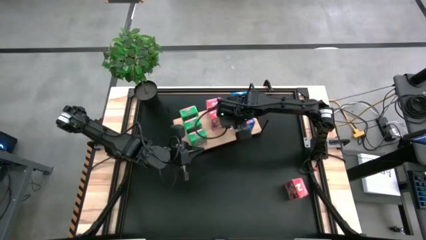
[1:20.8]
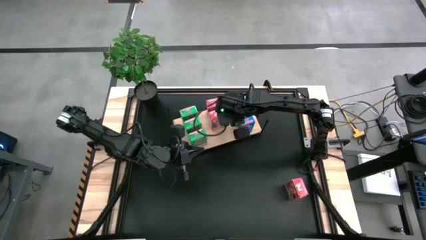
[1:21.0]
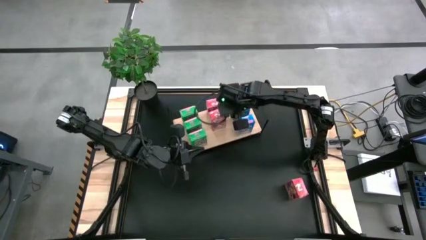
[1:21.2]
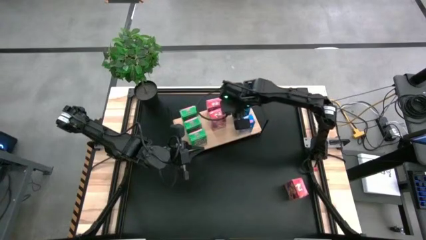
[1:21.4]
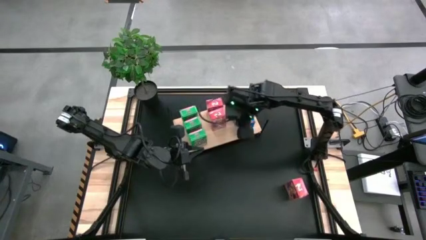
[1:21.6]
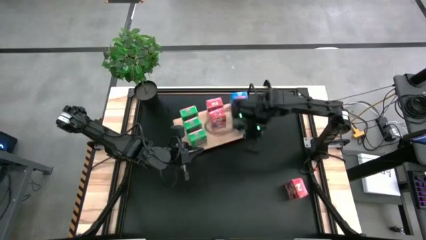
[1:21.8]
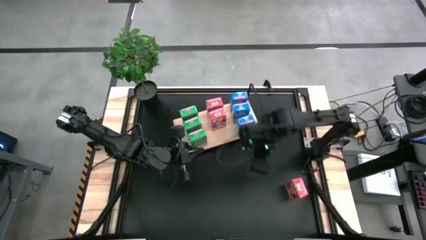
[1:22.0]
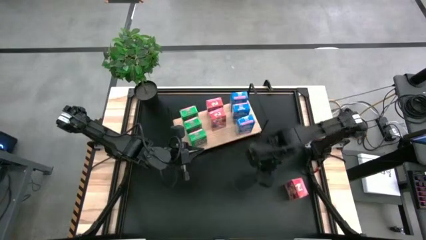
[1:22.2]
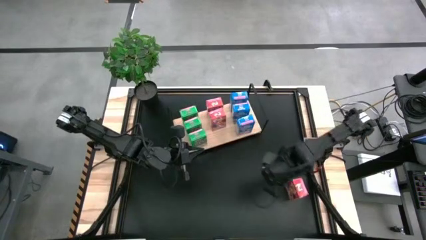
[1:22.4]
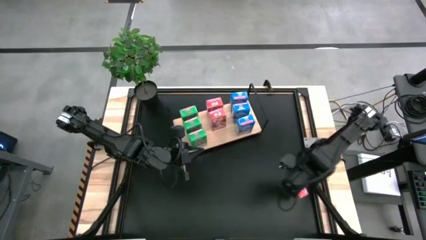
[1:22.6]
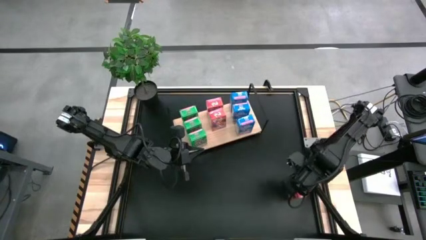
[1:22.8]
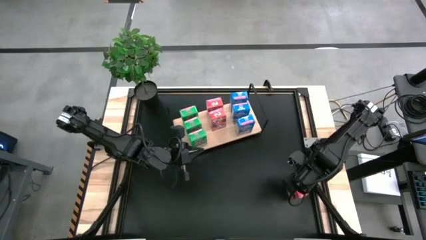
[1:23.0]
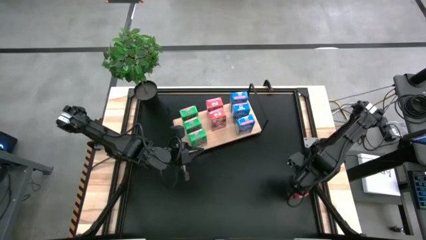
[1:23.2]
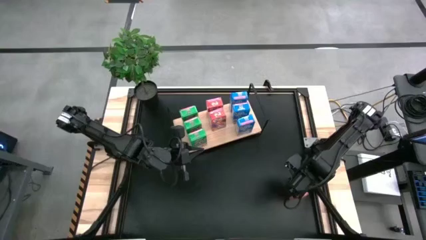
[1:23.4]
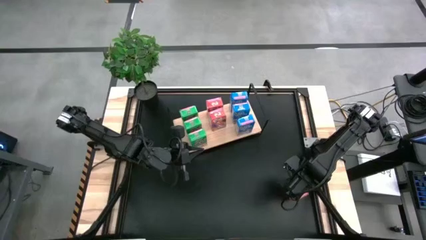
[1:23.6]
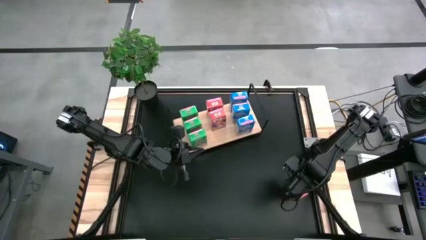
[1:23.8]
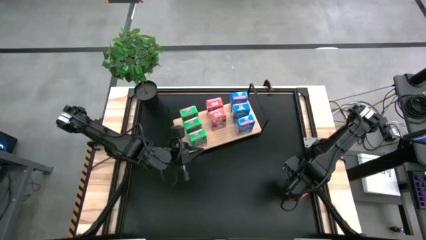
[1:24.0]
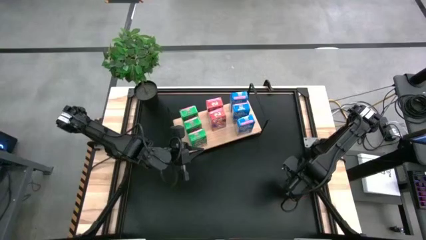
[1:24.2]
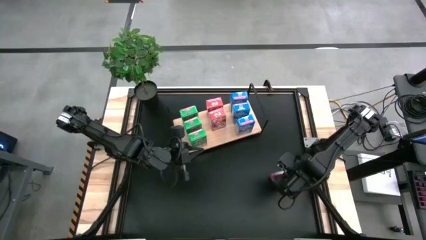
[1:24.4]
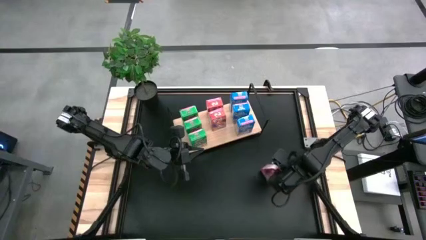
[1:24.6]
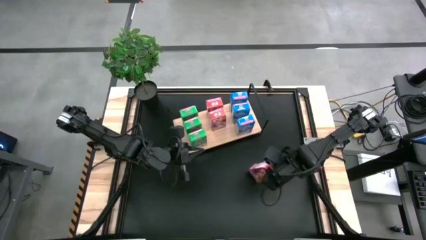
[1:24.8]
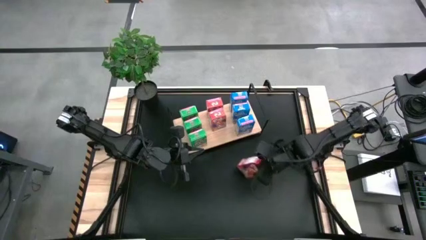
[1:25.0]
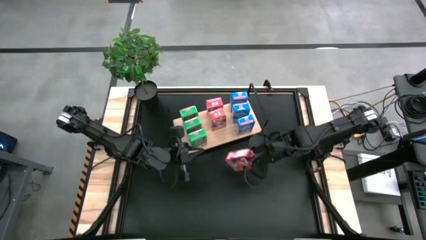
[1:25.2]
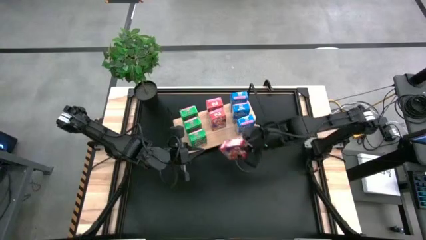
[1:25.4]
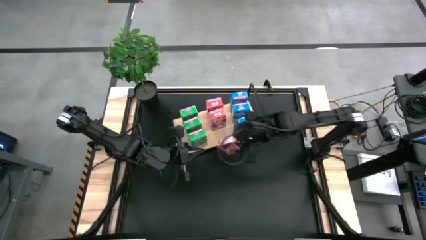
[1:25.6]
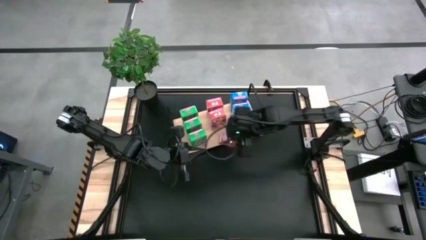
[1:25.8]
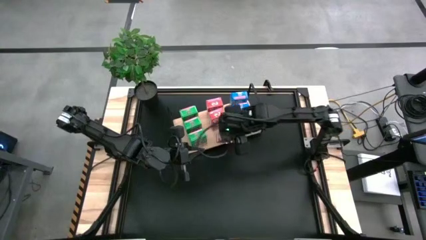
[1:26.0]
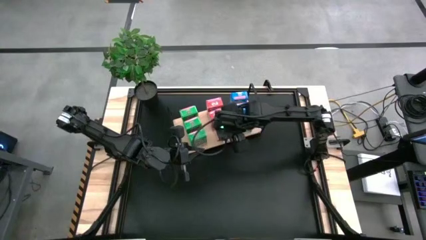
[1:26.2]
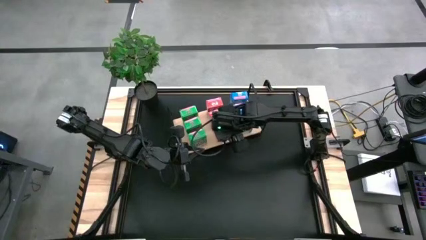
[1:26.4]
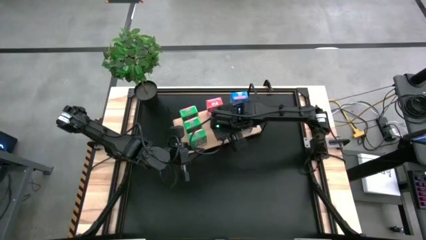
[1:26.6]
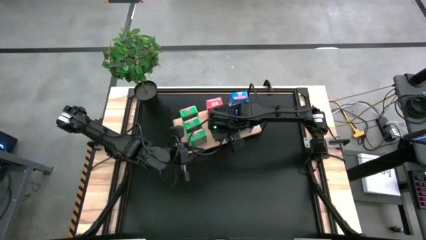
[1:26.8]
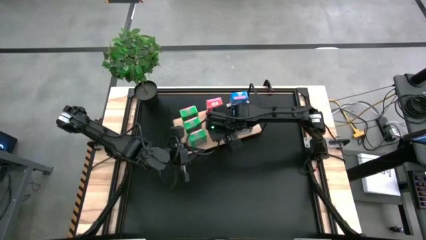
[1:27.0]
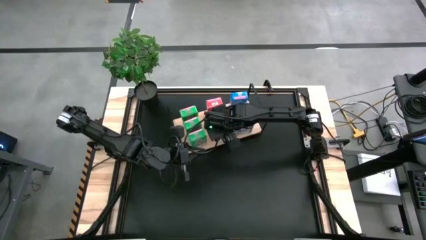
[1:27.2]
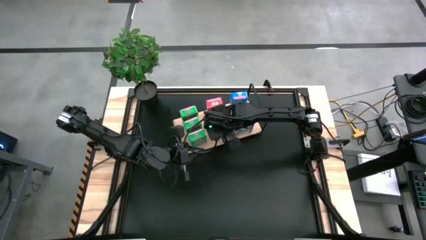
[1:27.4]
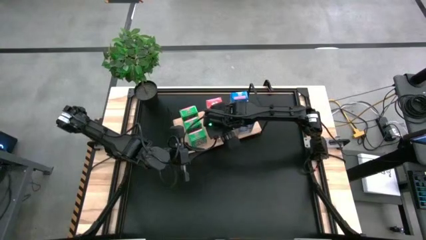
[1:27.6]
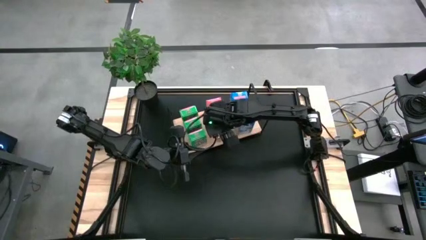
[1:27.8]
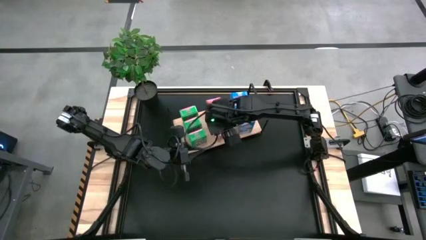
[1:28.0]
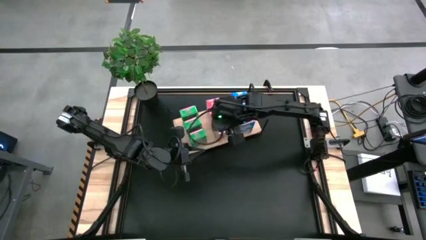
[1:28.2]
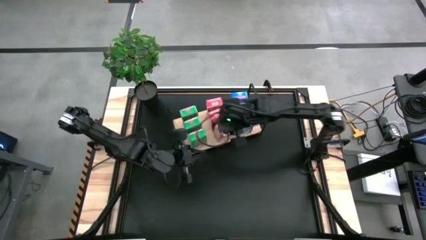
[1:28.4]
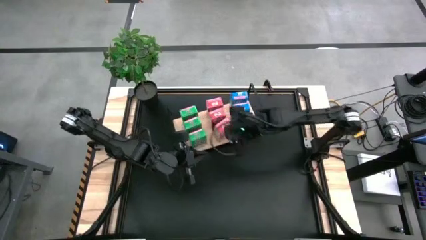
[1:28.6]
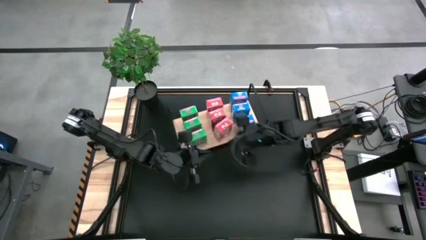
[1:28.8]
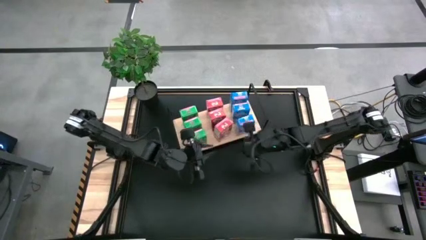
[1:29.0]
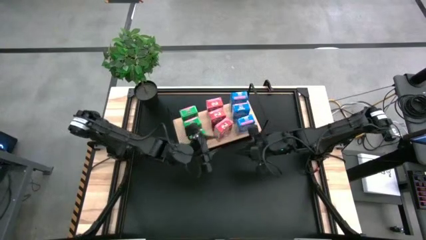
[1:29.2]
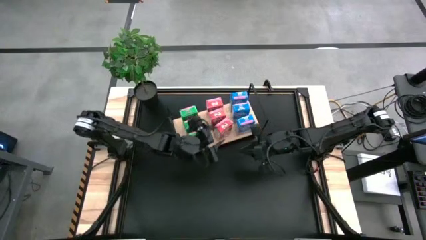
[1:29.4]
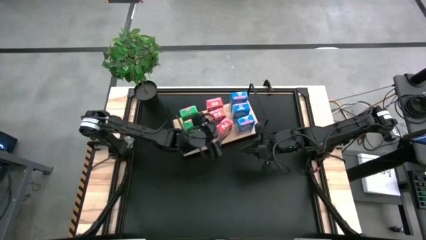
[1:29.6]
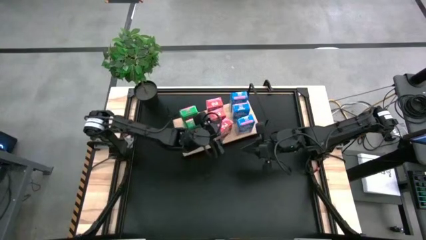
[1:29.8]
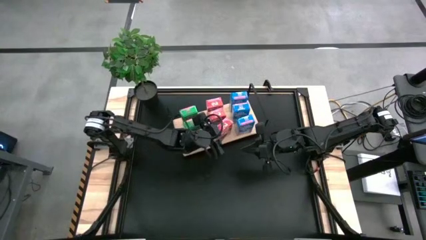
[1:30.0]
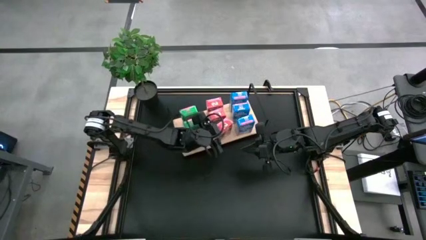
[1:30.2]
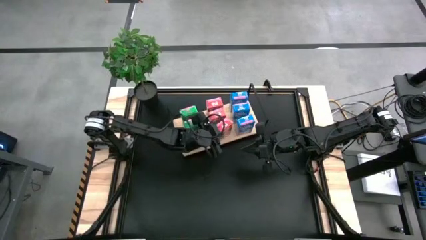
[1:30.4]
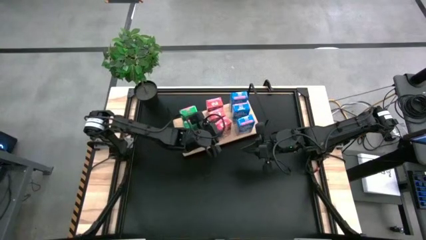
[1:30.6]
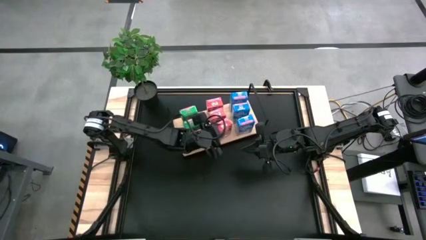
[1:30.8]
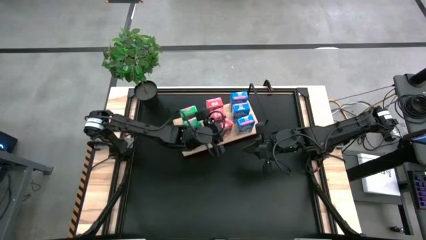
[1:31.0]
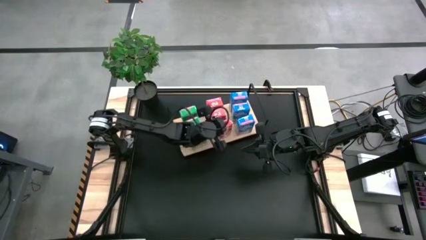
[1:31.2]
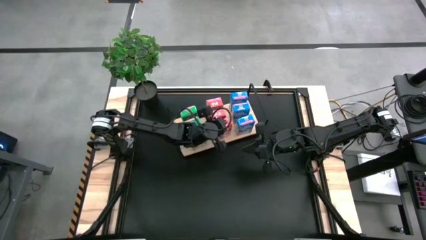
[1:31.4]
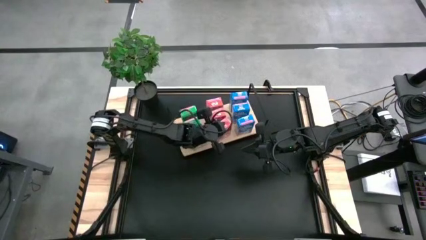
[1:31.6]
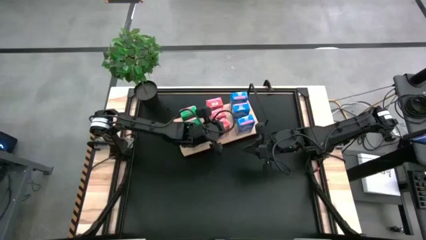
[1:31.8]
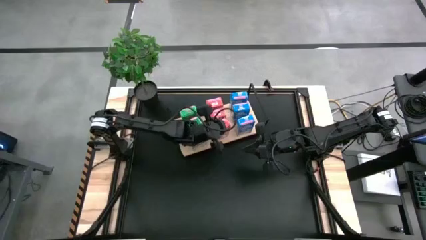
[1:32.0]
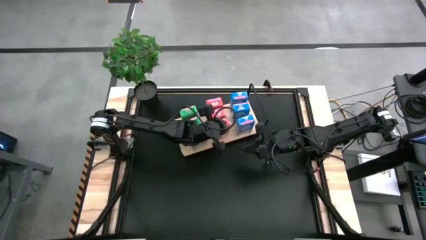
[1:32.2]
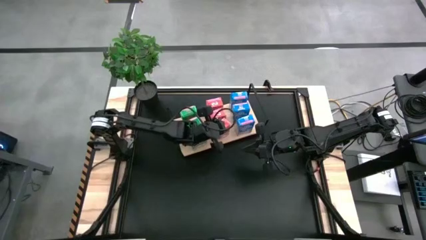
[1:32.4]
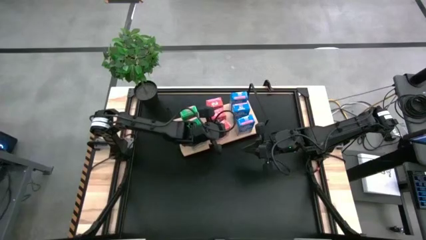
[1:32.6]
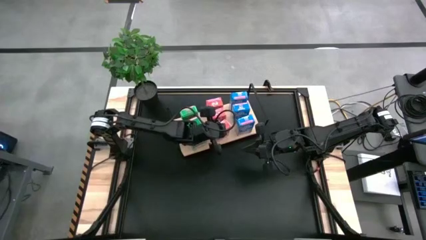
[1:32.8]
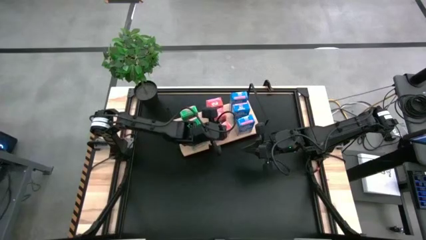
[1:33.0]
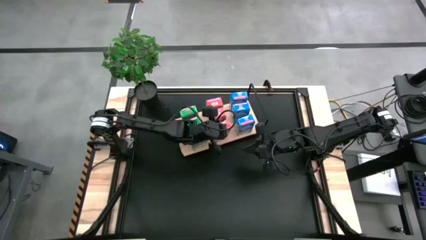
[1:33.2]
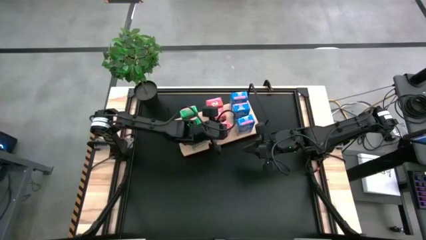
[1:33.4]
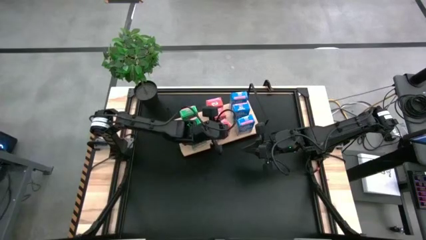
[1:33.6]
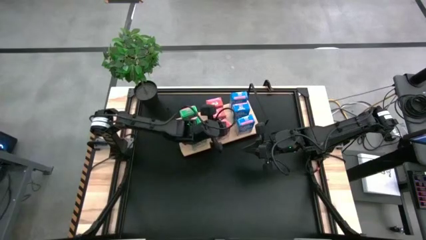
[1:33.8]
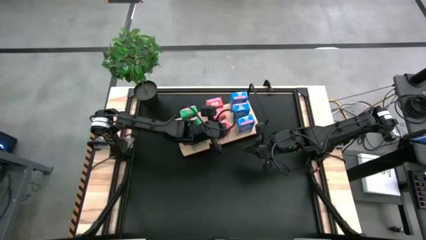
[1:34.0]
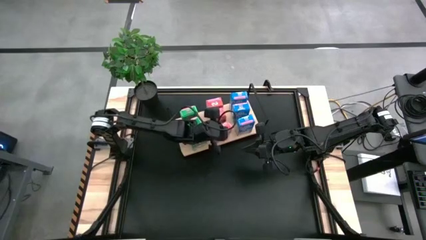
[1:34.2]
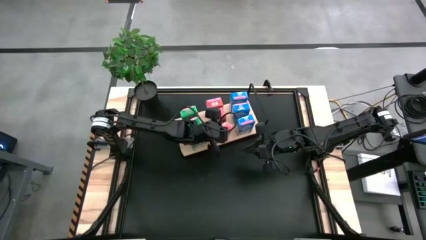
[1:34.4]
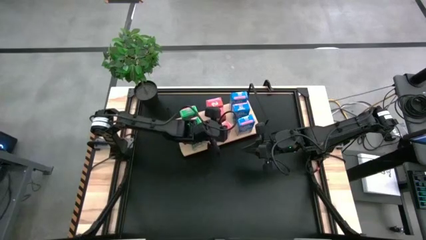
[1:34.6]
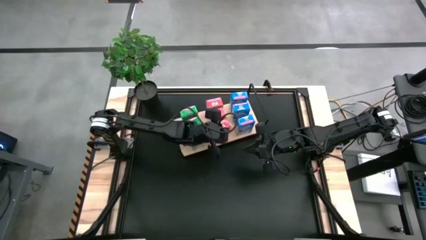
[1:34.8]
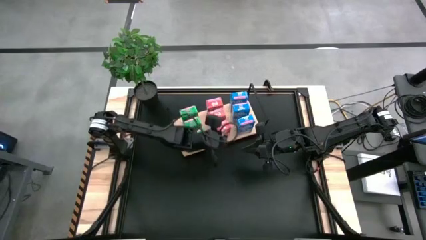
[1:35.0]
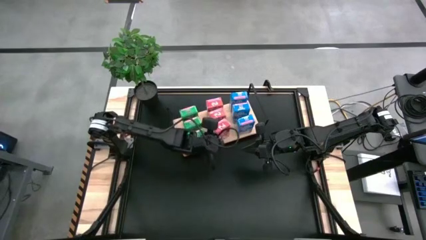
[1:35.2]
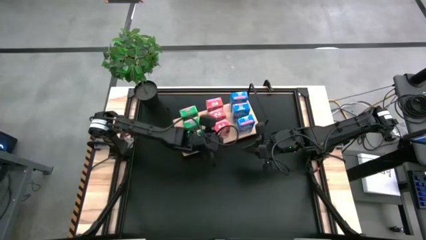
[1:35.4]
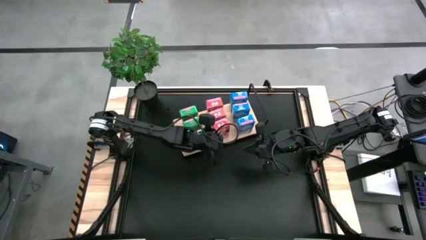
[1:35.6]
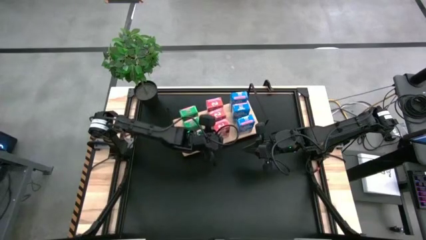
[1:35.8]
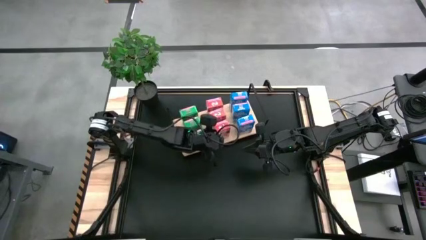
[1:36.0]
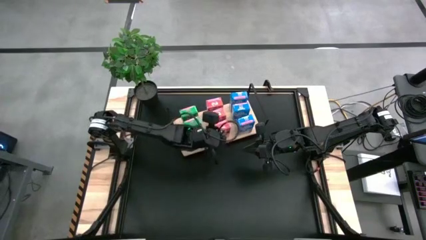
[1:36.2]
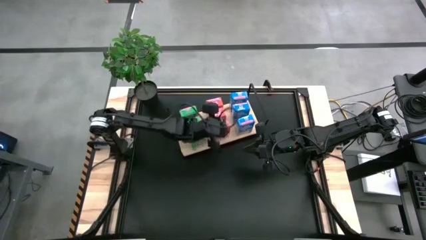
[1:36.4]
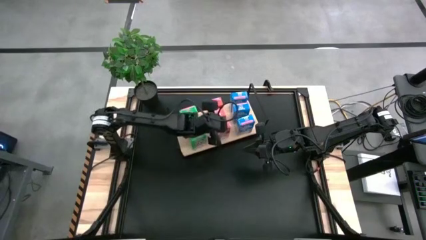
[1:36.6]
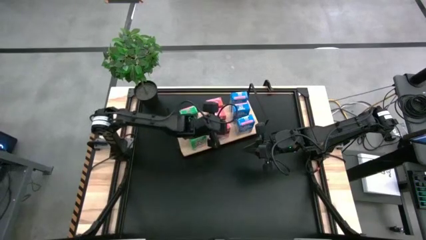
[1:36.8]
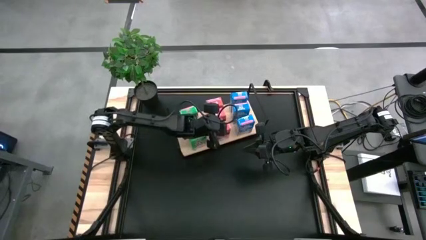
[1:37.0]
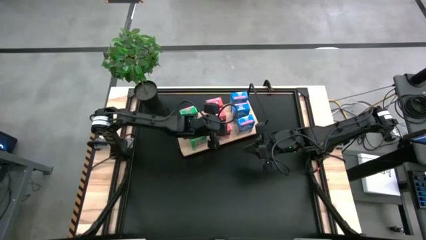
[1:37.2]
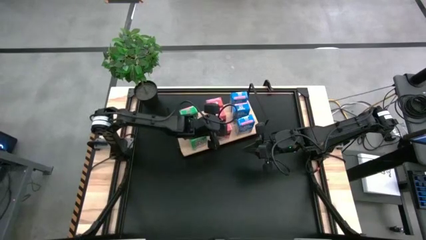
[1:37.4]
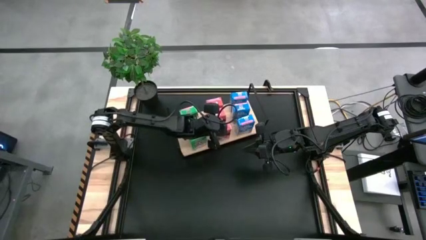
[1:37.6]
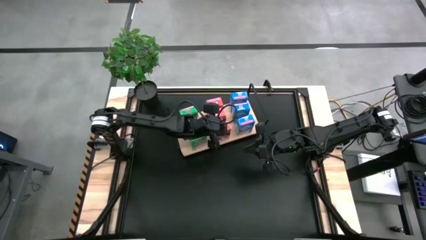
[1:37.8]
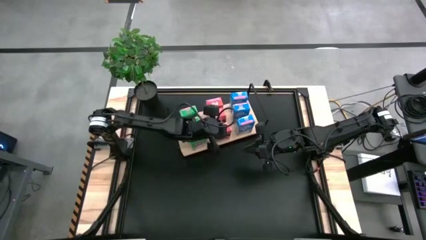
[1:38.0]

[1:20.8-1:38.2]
Task: Stack cereal on shelf
Align the red cereal box with the other red cereal box on the shelf
